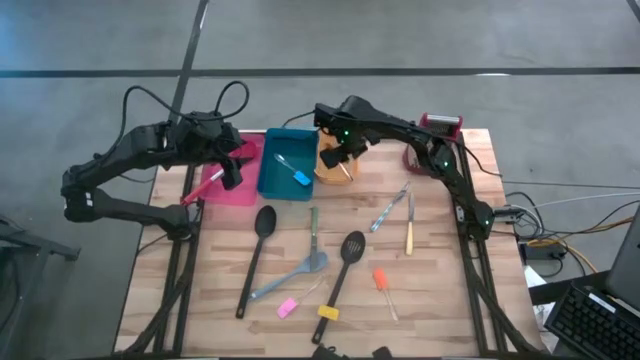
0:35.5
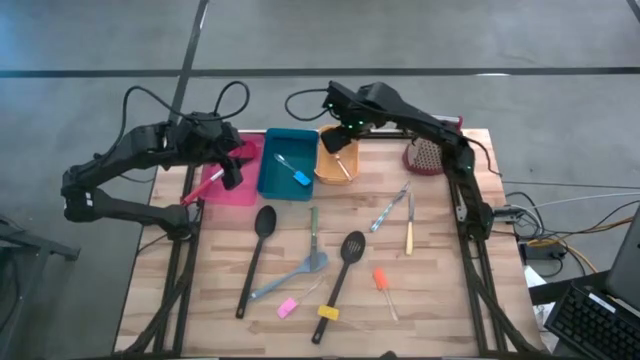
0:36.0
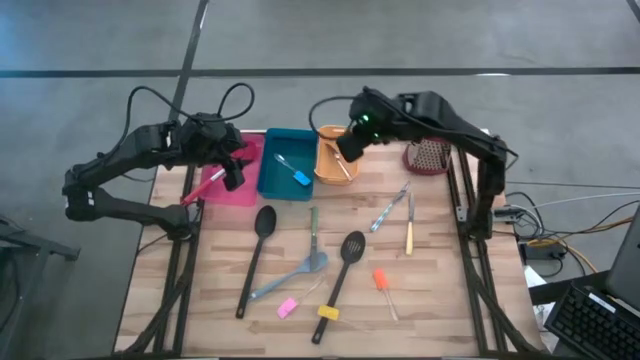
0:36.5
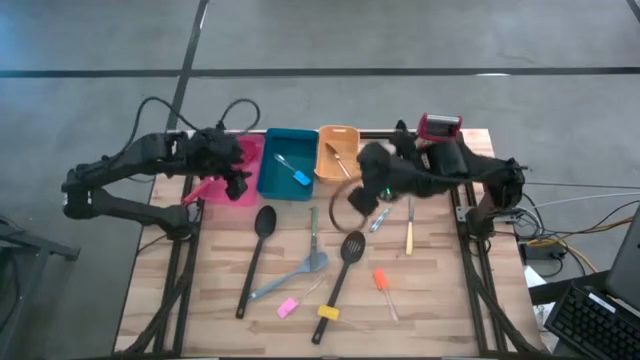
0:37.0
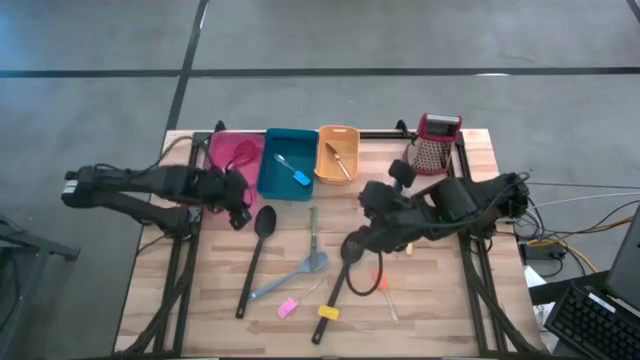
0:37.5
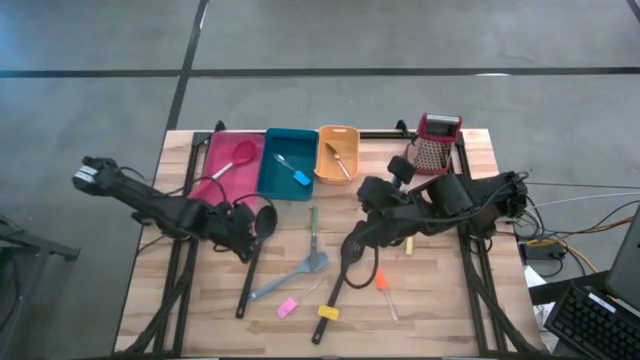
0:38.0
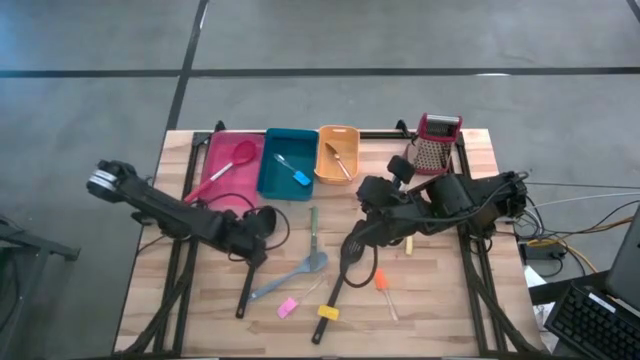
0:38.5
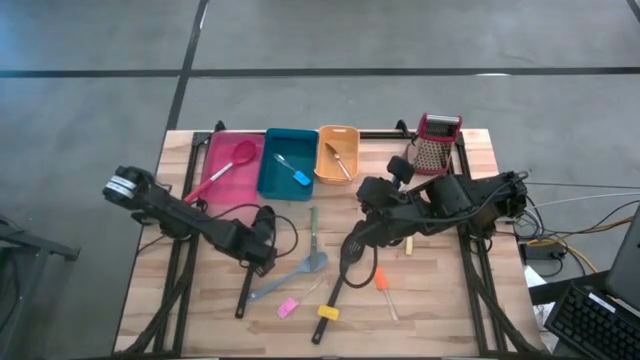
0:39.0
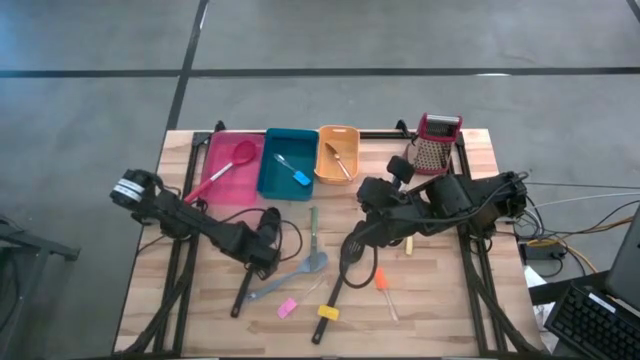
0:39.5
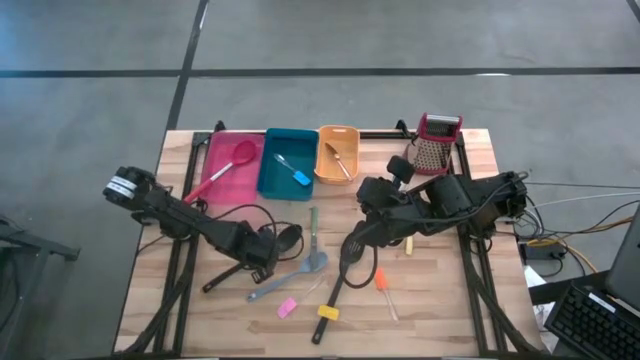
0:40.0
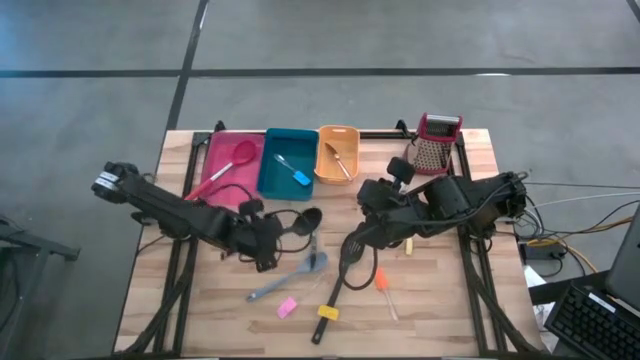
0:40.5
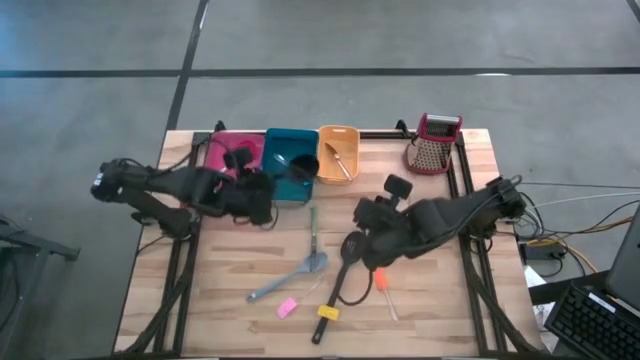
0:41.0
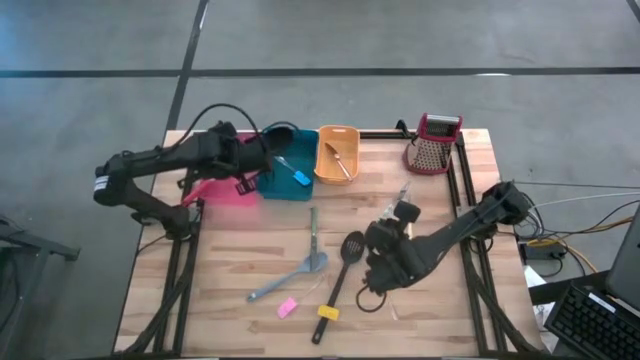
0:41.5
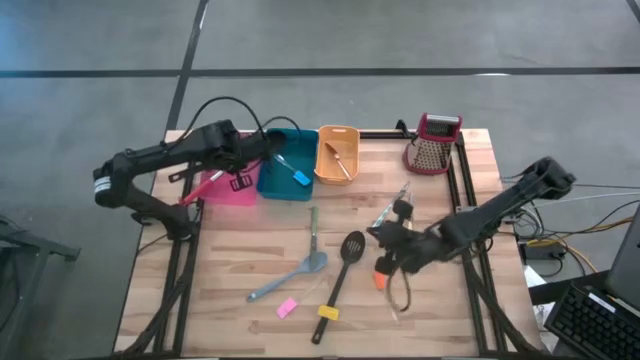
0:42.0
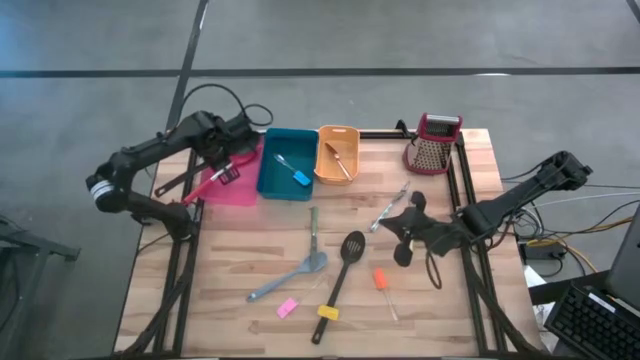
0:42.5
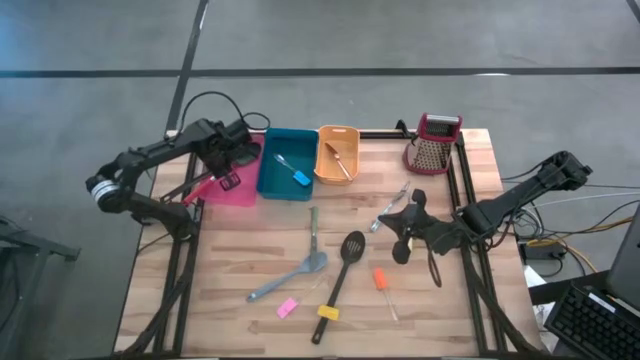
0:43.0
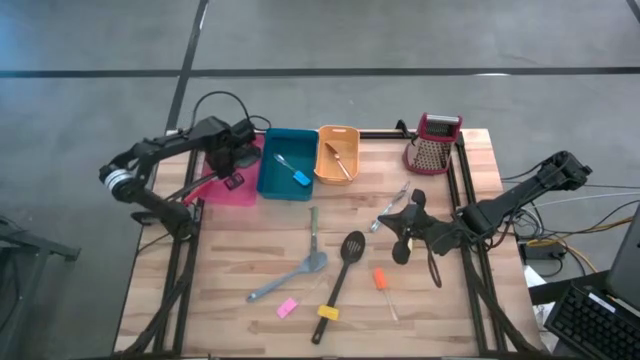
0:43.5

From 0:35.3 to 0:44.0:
Task: Pick & Place Kitchen Items
Put the black serving spoon into the pink bin

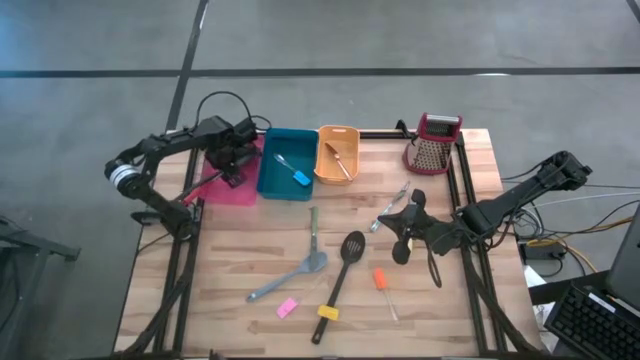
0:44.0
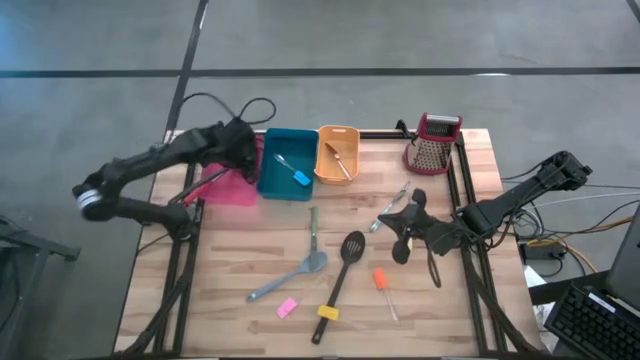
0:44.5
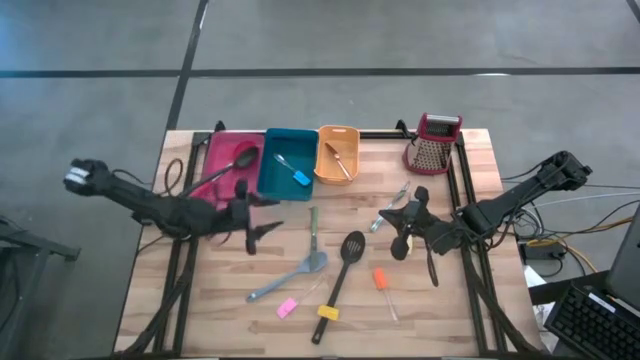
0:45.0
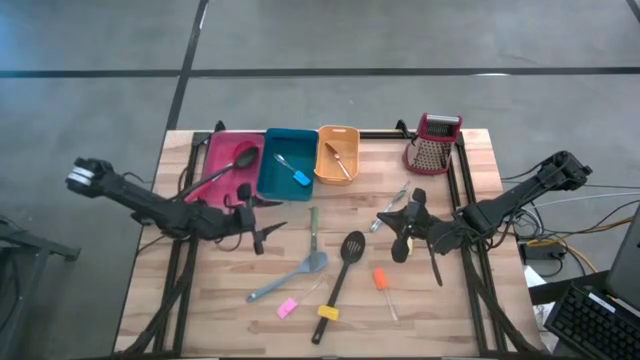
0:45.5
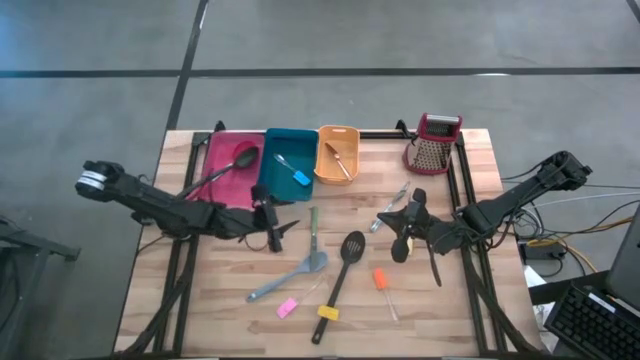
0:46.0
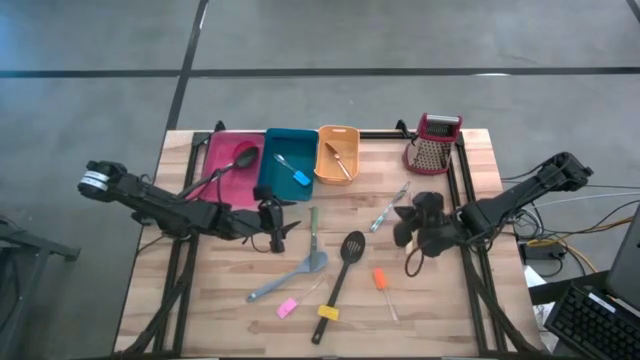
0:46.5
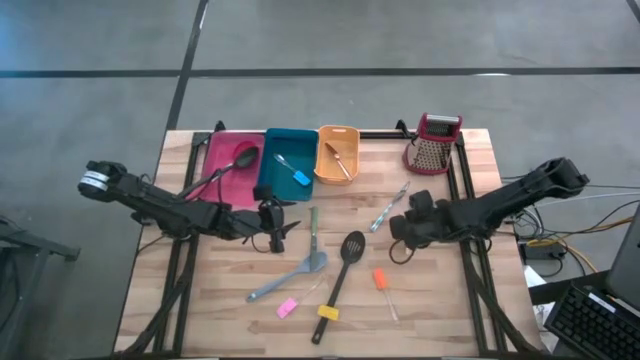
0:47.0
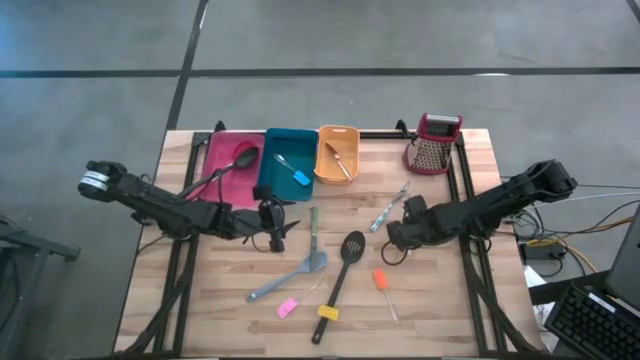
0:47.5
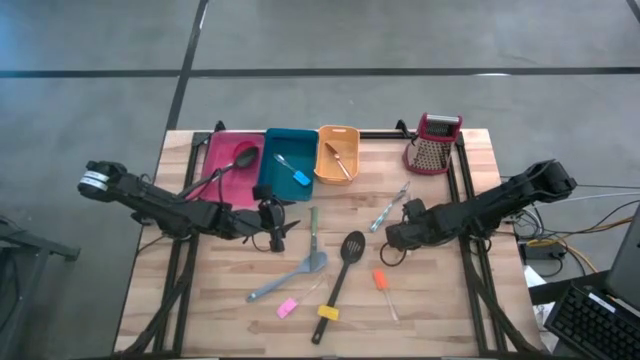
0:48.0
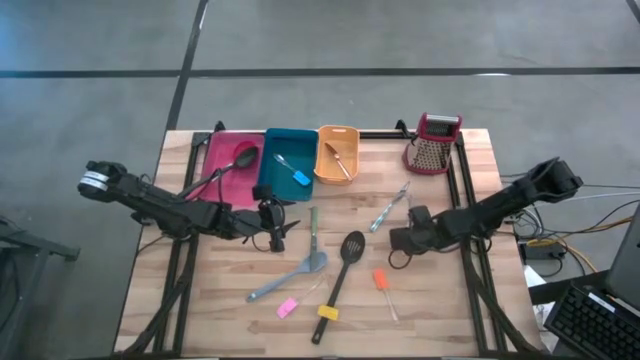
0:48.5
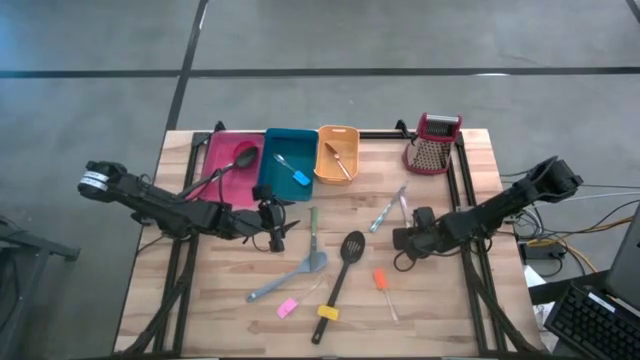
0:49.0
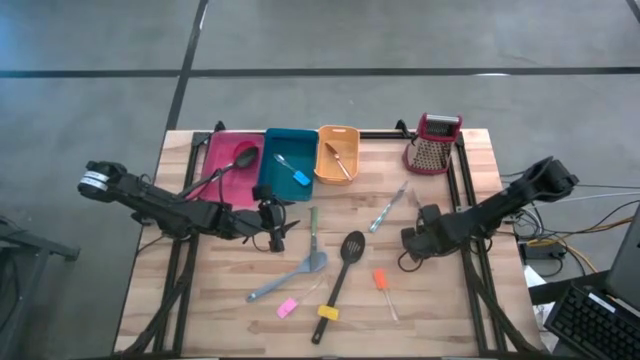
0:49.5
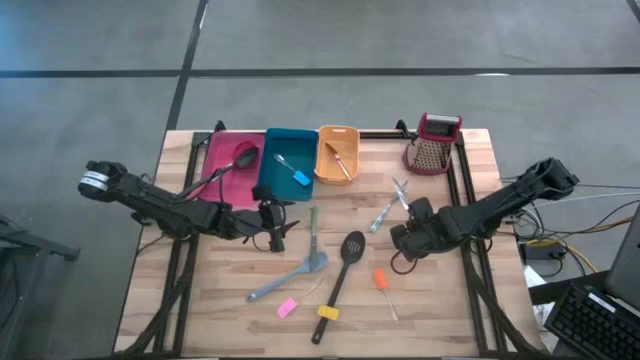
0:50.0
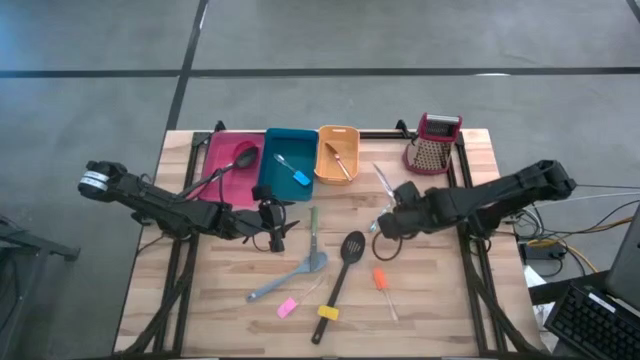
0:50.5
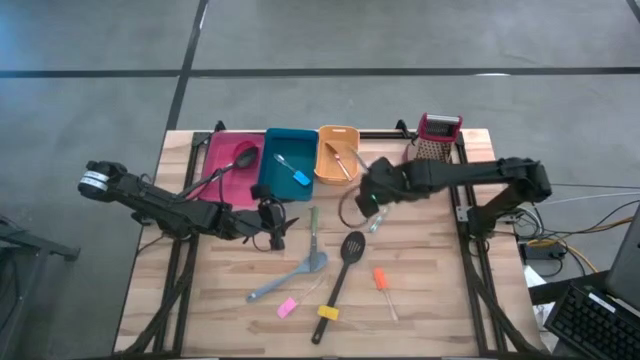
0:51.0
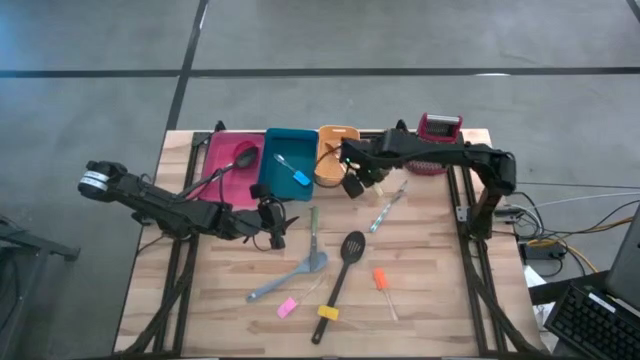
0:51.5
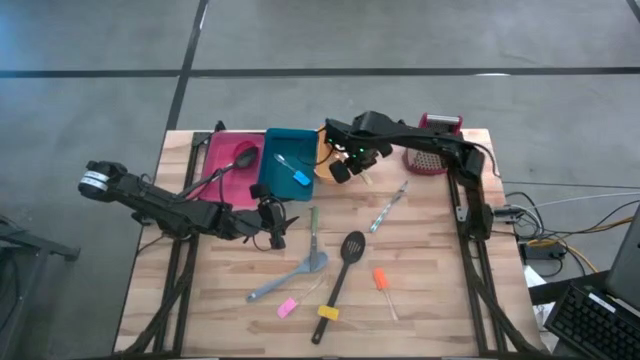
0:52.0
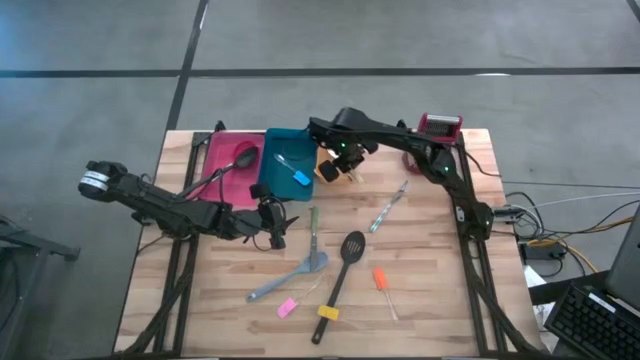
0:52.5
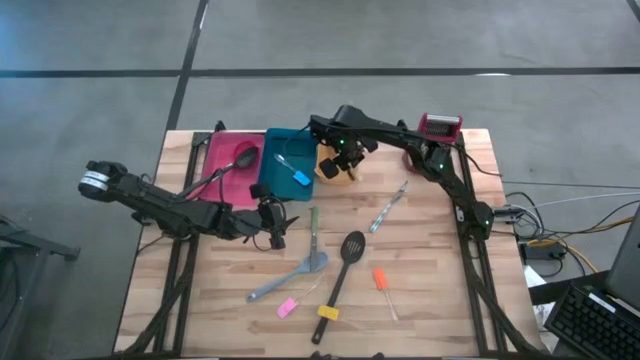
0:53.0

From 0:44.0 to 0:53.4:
Put the yellow knife into the yellow bin

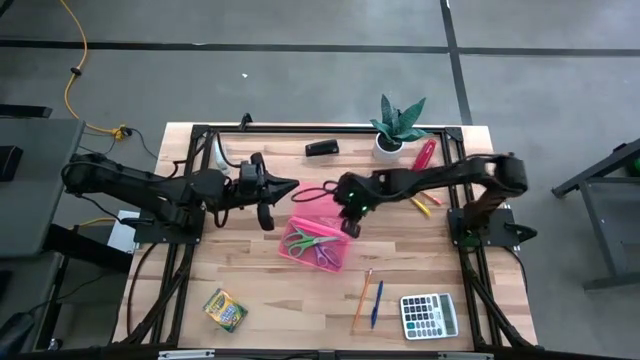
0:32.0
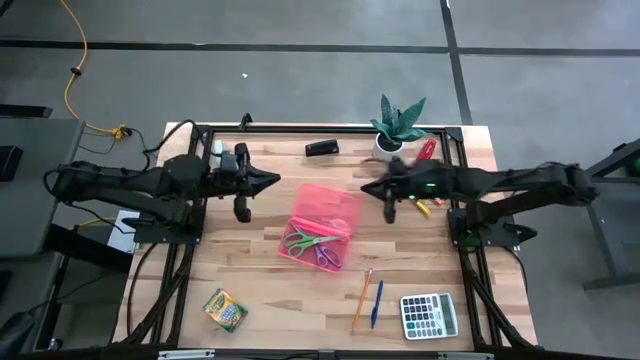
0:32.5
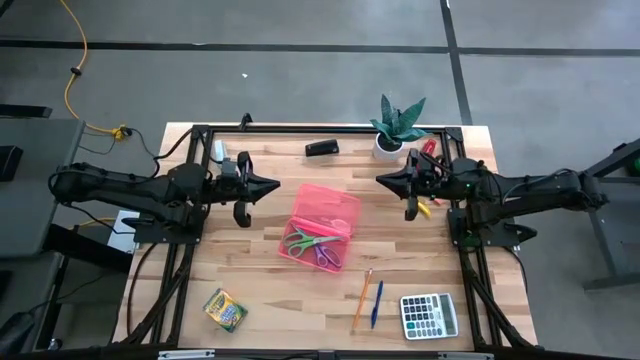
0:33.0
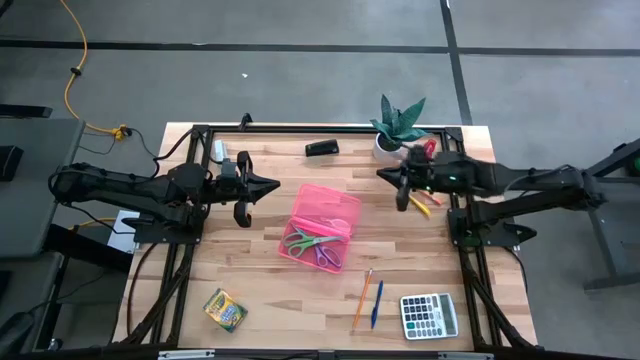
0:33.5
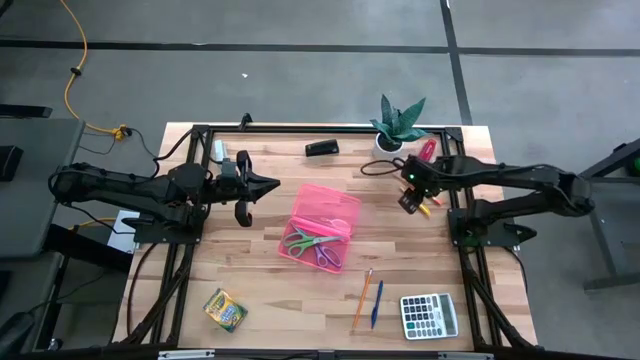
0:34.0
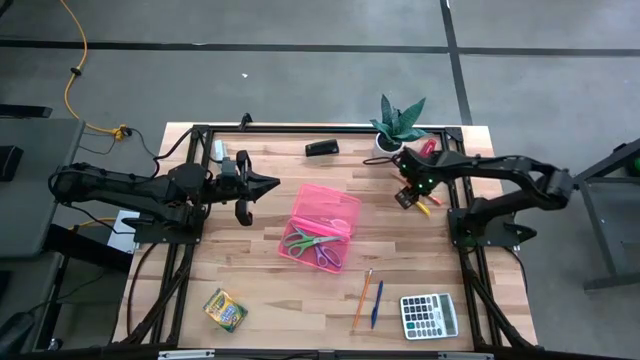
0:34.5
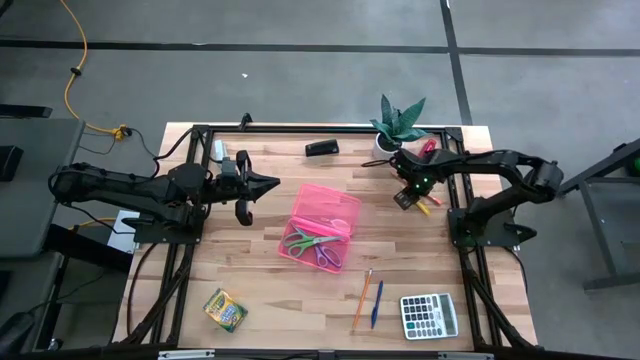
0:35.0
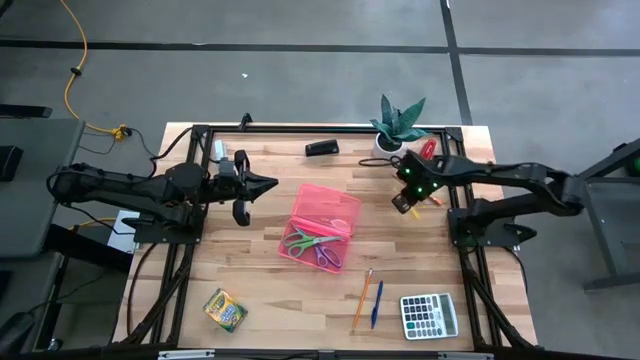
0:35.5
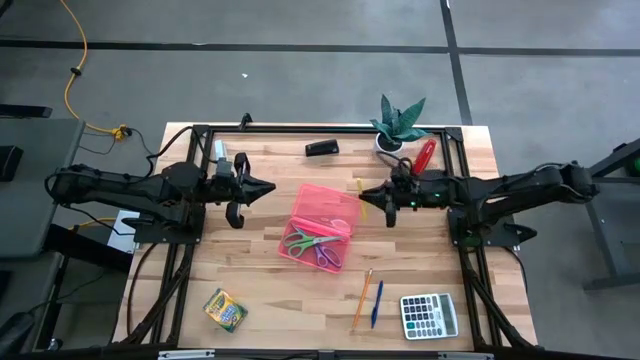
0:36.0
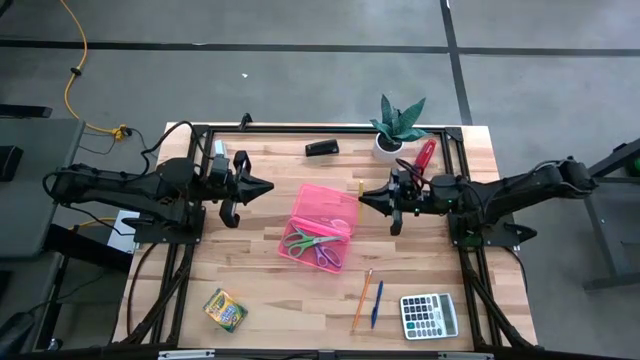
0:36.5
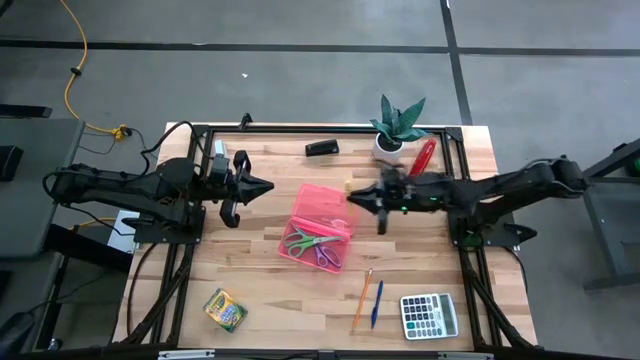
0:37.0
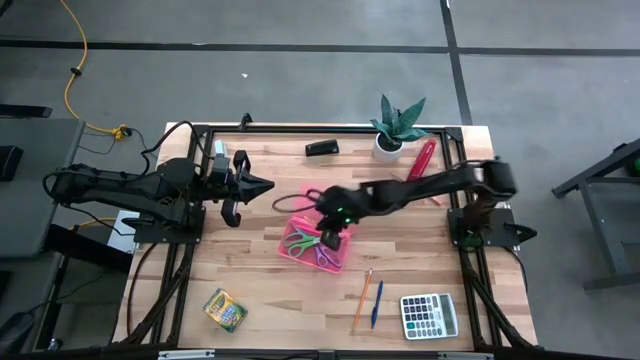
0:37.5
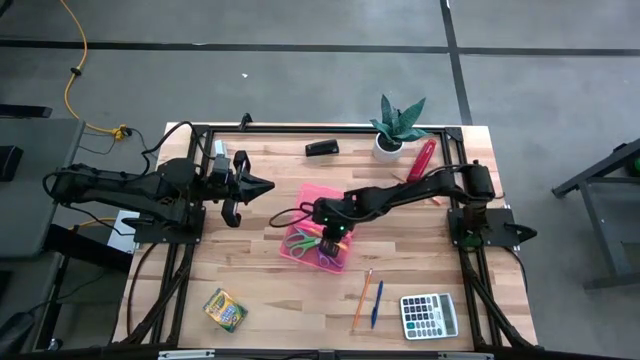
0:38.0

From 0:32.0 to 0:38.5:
Task: Pick & place school supplies into a supply box
Put the yellow pen into the pink supply box
